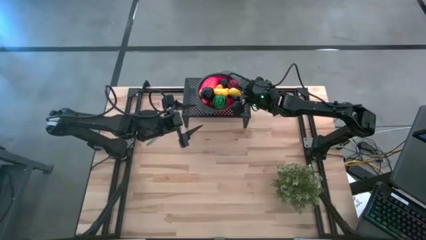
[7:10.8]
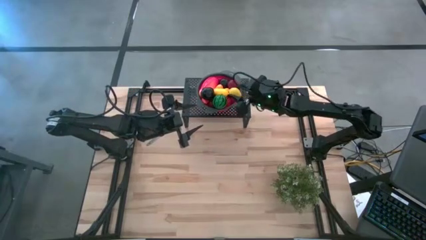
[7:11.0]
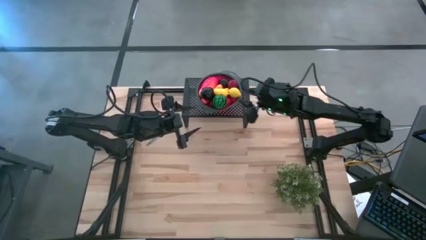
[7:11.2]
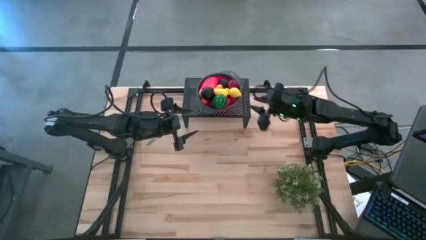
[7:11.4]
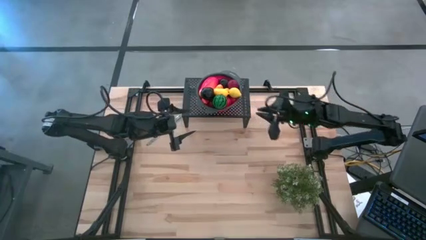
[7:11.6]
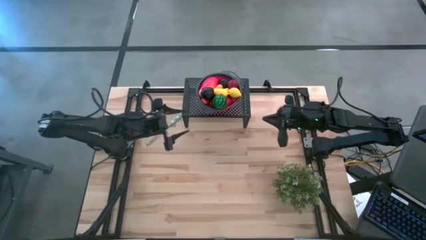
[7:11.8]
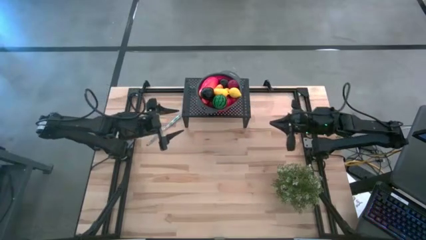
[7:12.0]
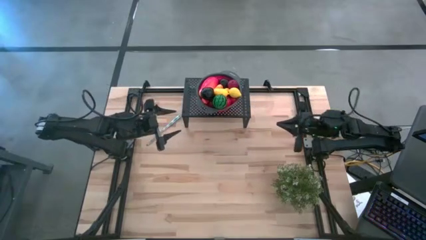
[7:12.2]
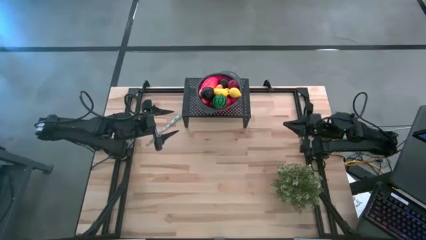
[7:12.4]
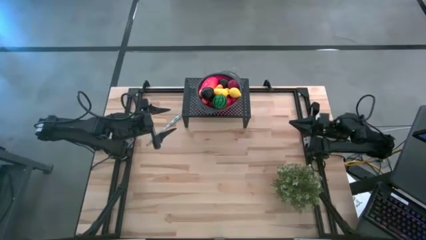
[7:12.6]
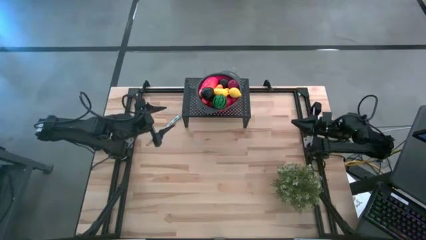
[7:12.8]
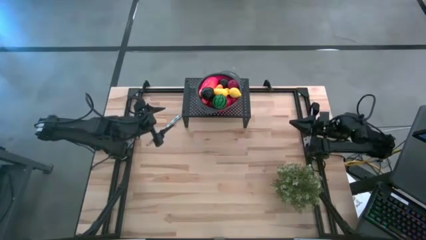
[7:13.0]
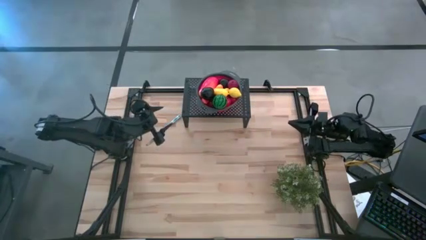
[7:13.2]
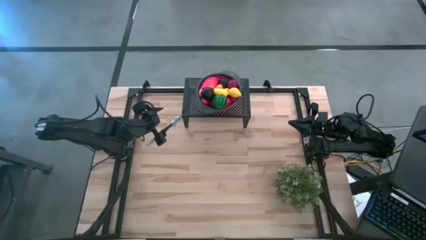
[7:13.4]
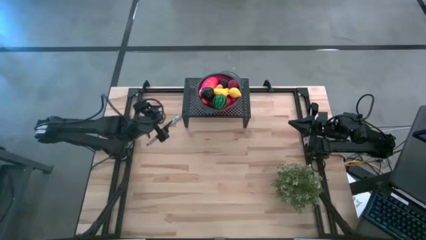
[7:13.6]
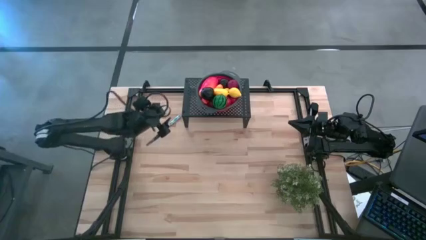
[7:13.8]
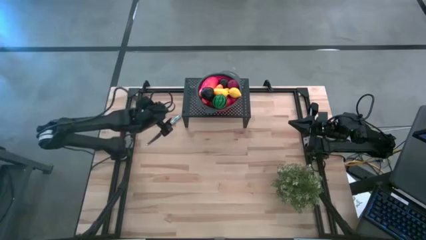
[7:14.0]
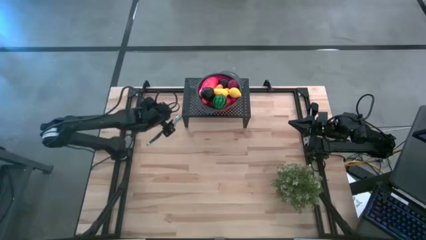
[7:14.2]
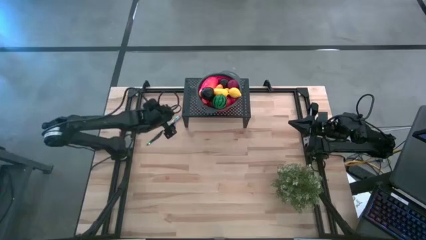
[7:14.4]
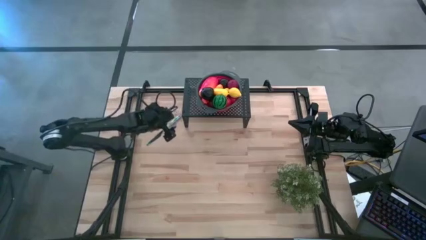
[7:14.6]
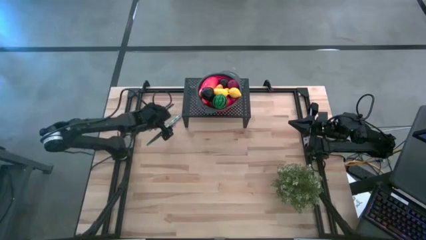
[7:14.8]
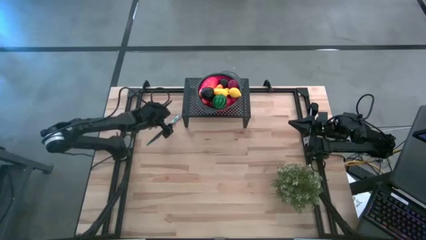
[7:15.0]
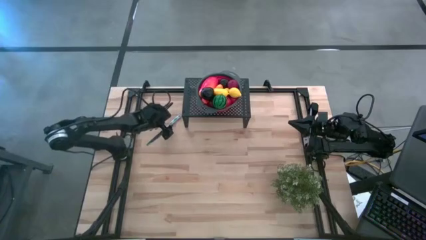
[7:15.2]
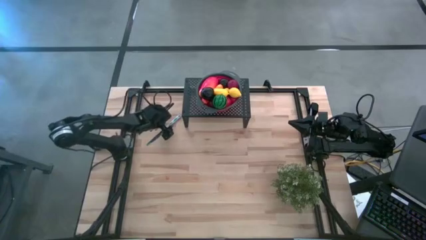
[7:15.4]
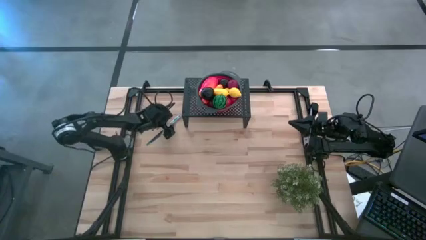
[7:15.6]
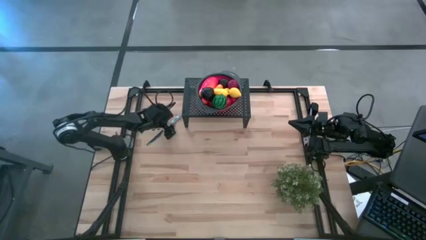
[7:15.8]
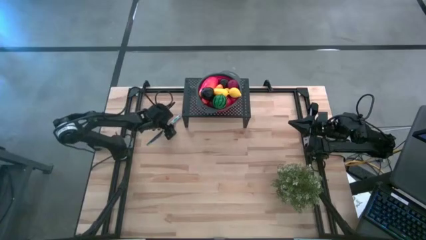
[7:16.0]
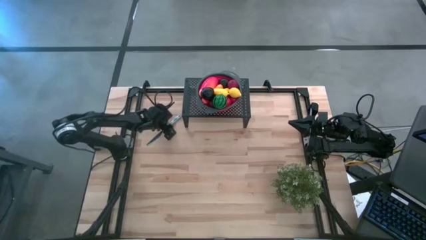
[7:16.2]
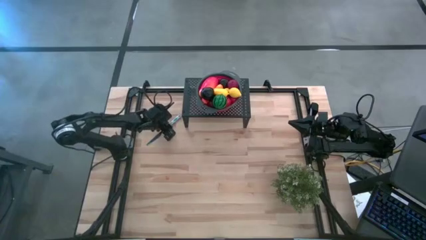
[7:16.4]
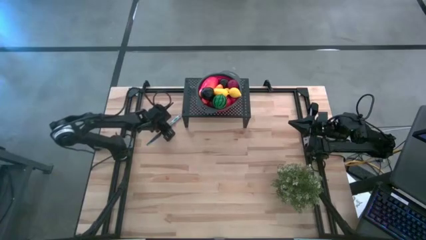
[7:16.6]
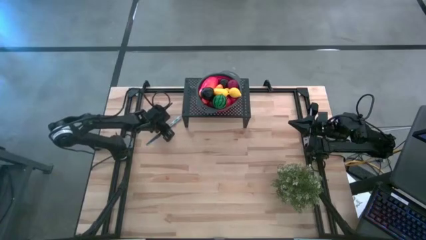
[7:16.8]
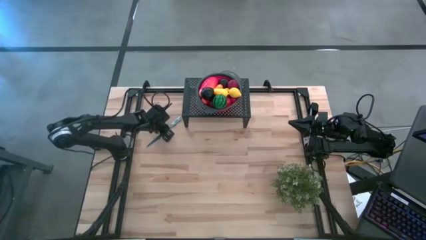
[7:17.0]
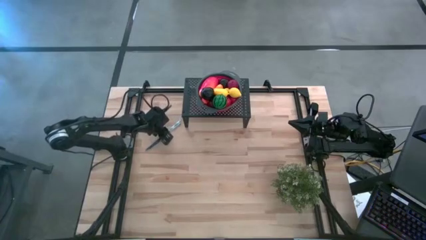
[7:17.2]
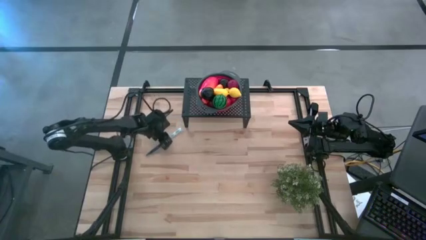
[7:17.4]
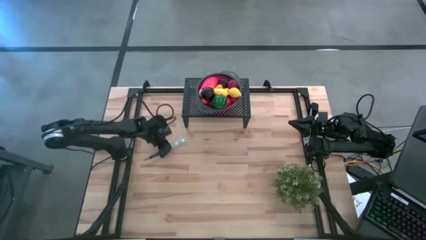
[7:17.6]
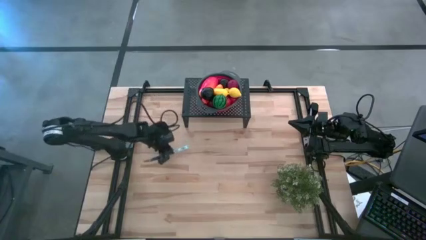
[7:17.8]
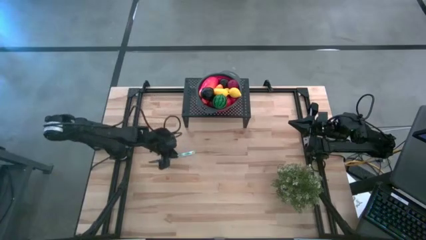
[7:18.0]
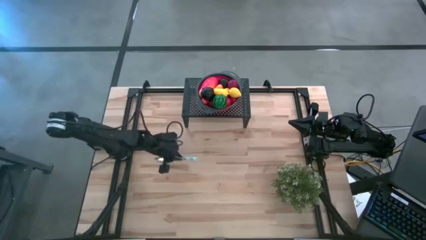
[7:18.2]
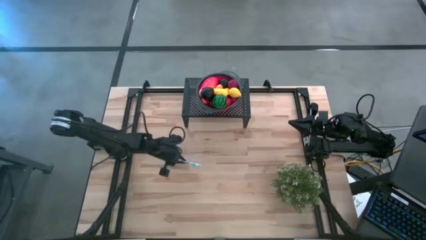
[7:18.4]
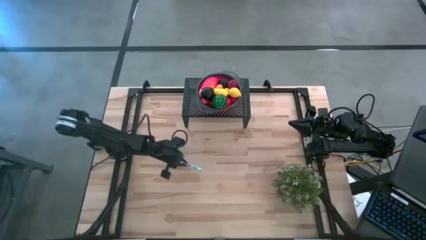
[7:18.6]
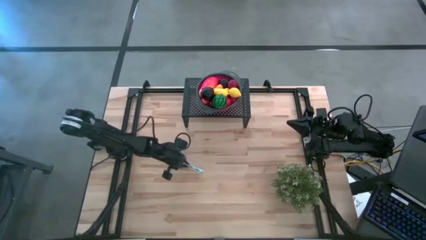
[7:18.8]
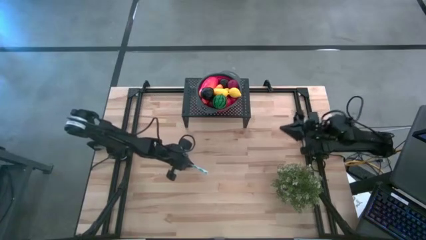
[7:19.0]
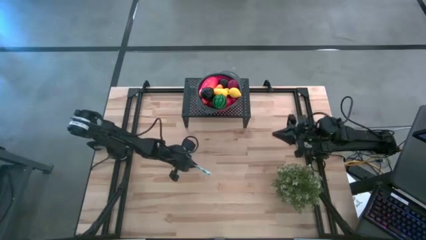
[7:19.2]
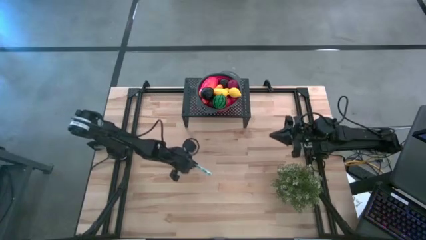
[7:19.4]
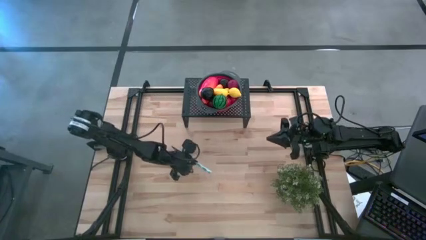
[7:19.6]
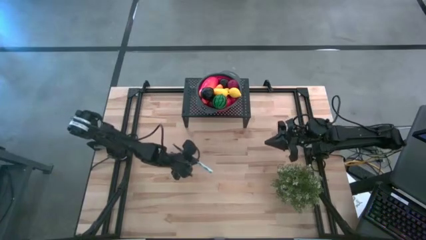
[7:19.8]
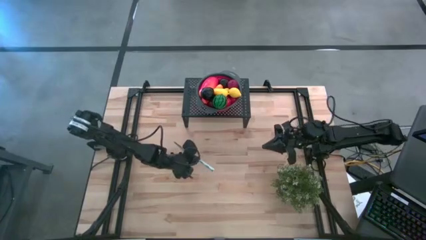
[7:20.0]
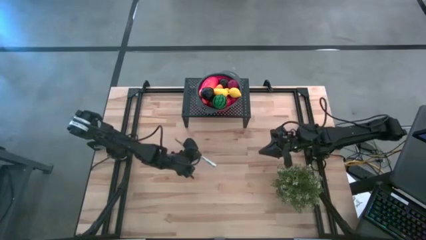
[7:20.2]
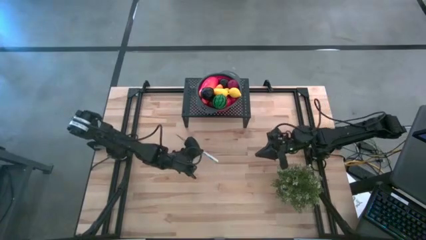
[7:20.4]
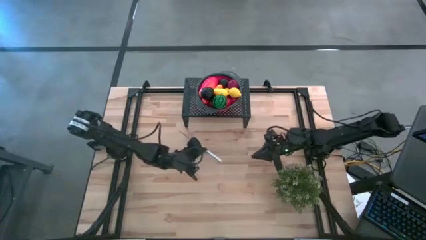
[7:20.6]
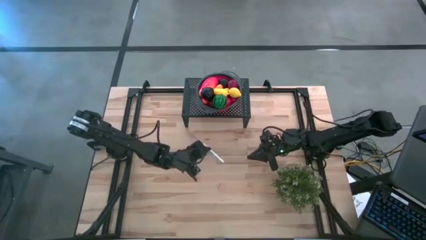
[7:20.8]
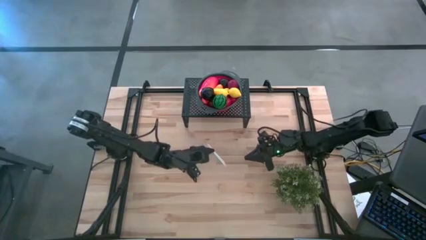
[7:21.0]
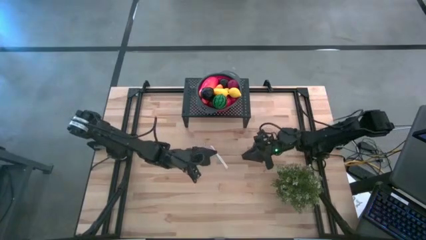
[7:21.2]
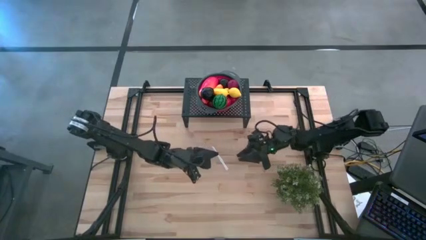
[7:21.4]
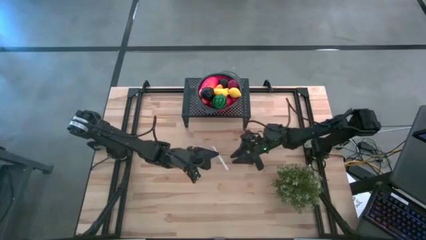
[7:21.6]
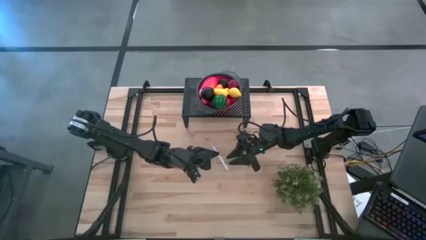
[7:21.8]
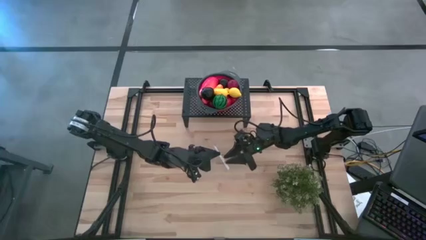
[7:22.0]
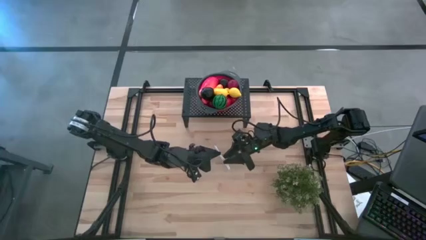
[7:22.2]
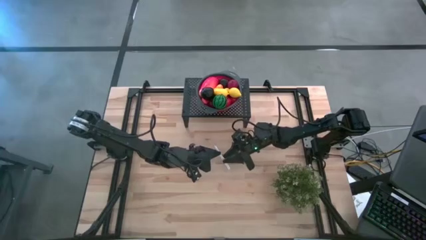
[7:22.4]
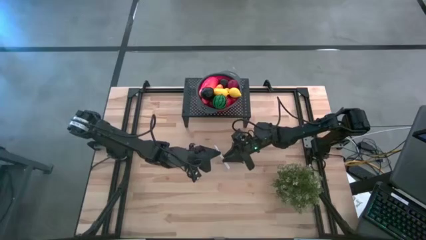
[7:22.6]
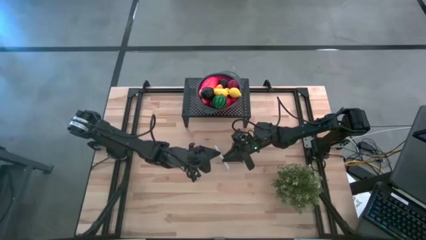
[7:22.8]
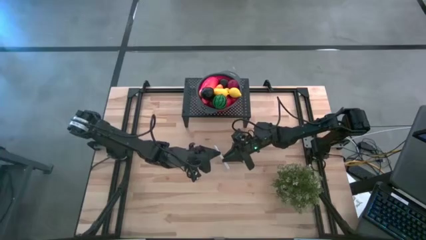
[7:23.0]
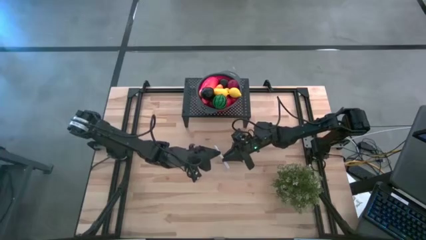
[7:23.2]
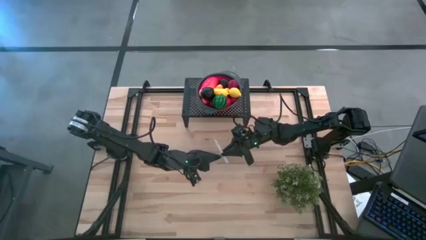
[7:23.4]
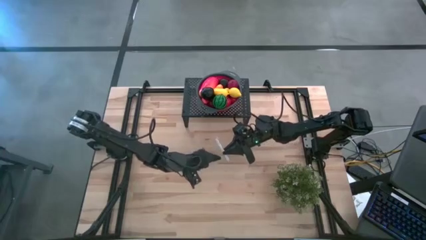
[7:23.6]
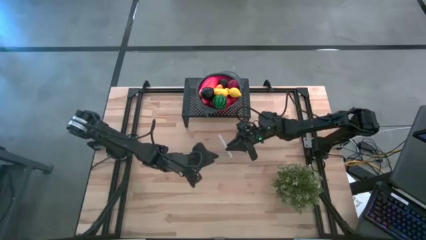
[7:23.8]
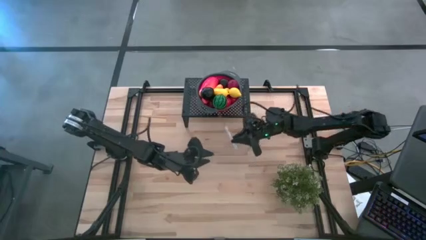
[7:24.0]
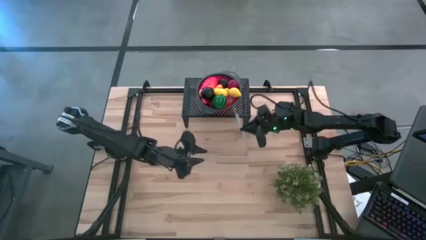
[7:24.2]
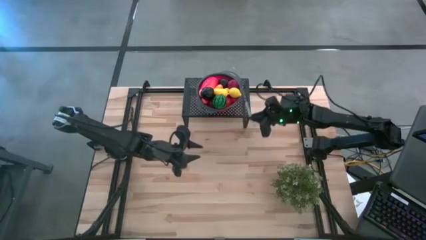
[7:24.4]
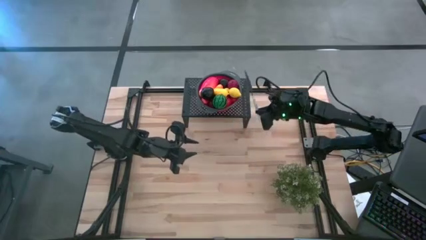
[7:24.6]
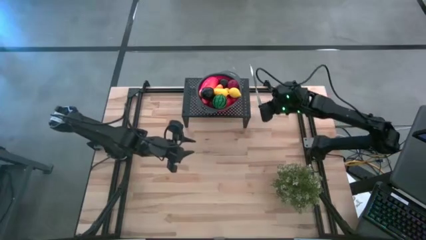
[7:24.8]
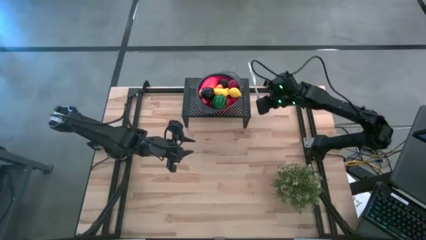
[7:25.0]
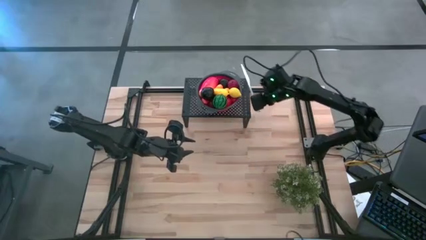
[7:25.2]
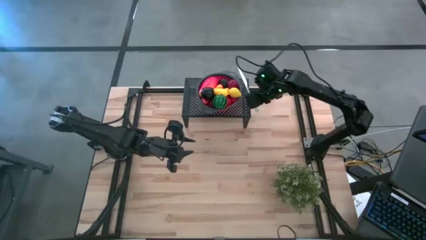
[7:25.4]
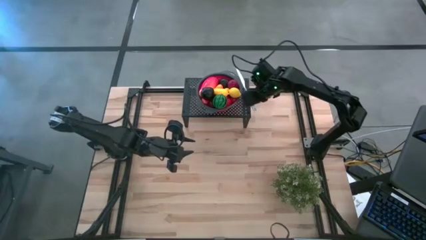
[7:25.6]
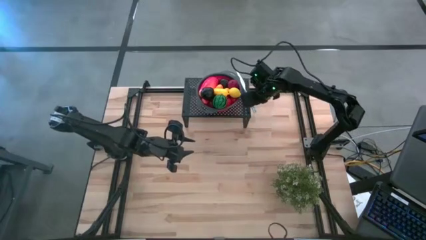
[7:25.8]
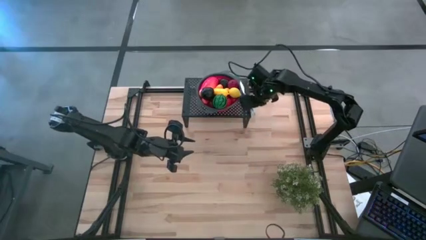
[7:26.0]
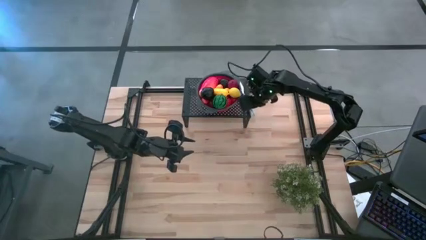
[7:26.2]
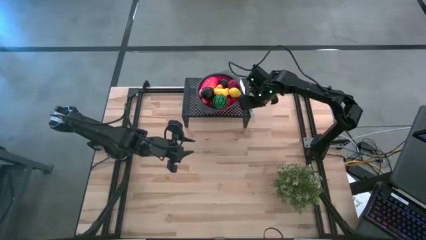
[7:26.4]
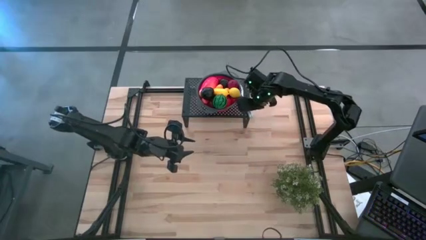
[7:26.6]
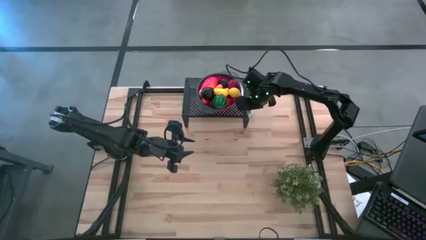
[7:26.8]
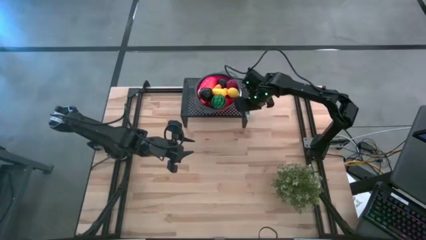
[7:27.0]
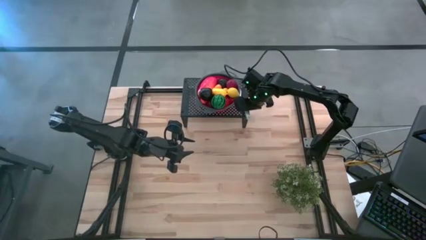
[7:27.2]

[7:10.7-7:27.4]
Task: Pick & Place Fruit
Put the blue patterned knife on the shelf
